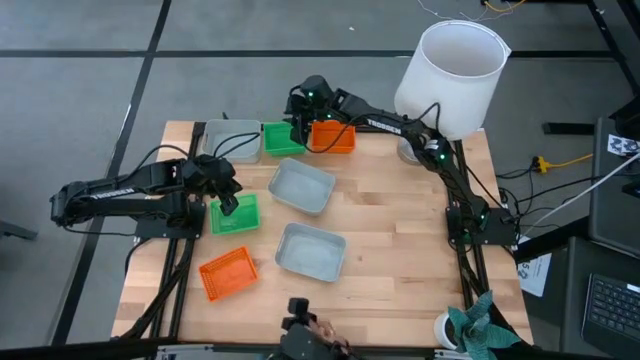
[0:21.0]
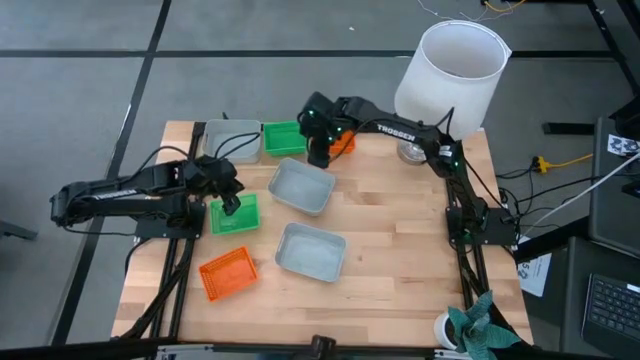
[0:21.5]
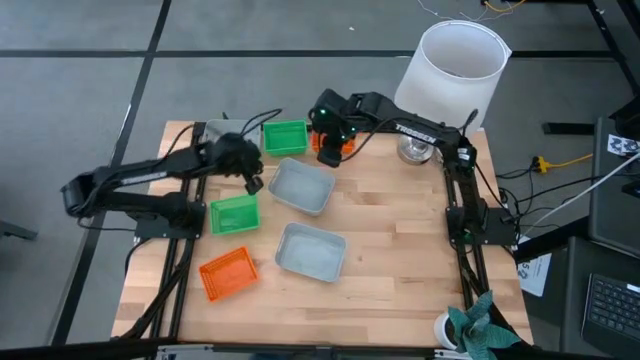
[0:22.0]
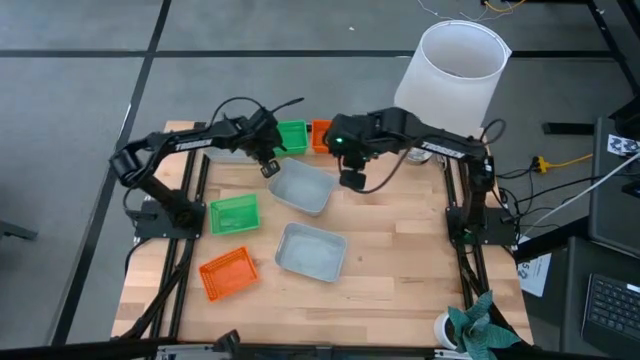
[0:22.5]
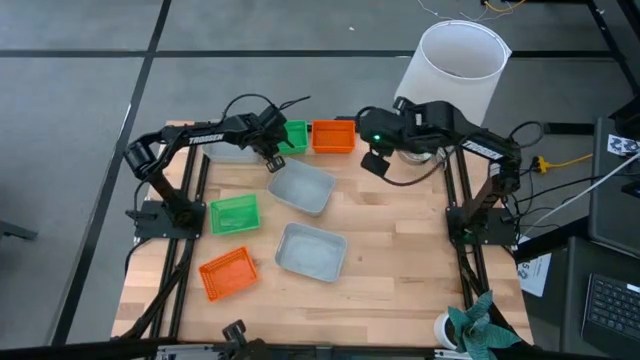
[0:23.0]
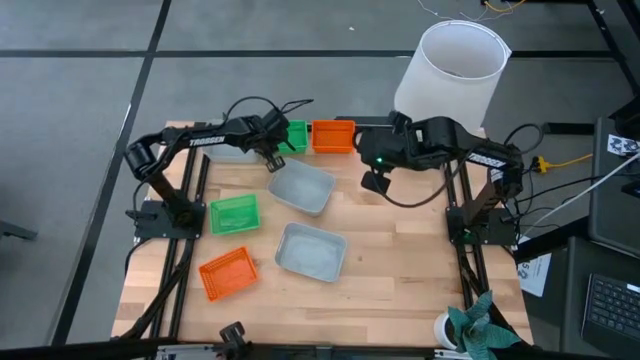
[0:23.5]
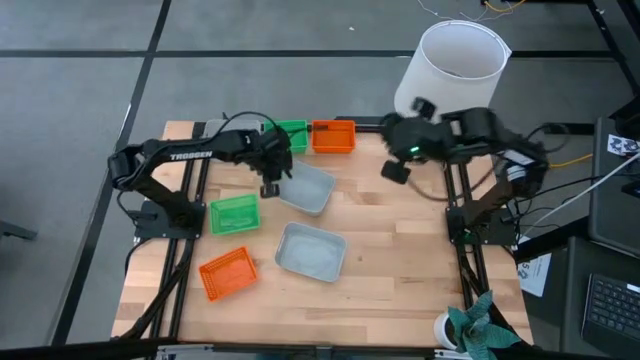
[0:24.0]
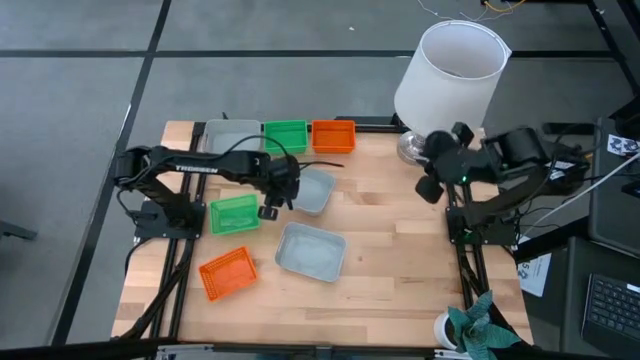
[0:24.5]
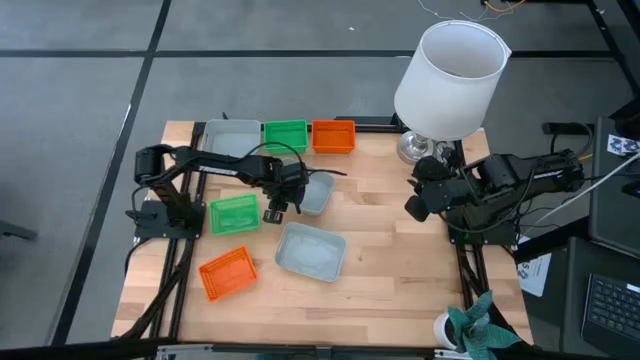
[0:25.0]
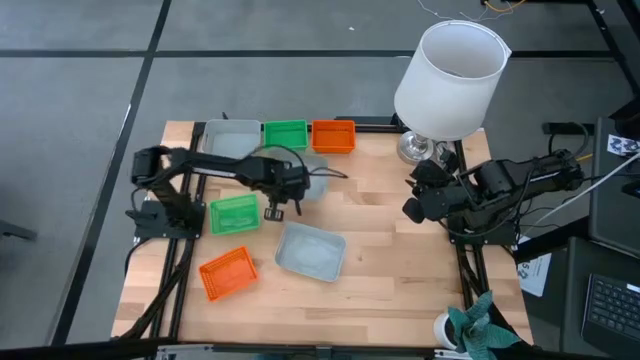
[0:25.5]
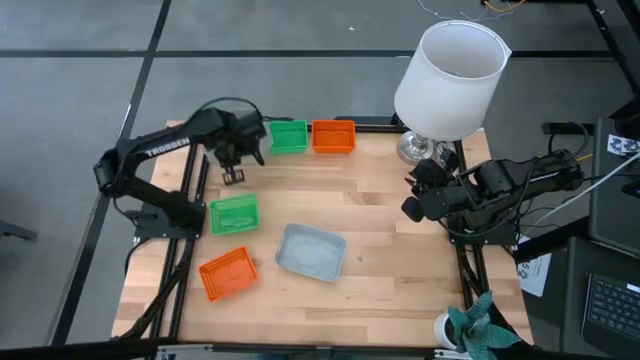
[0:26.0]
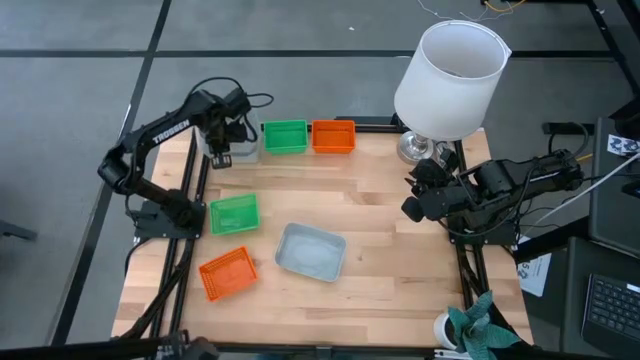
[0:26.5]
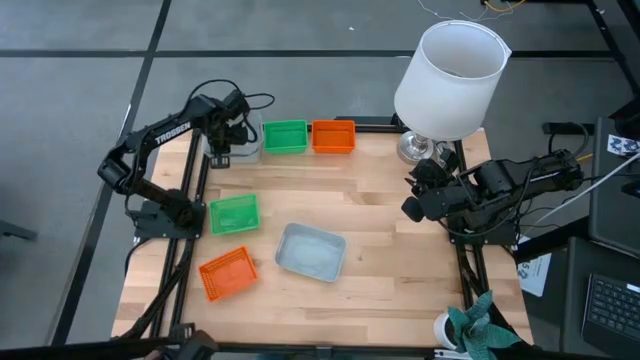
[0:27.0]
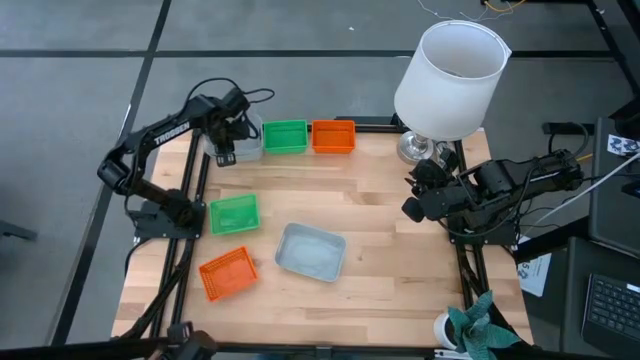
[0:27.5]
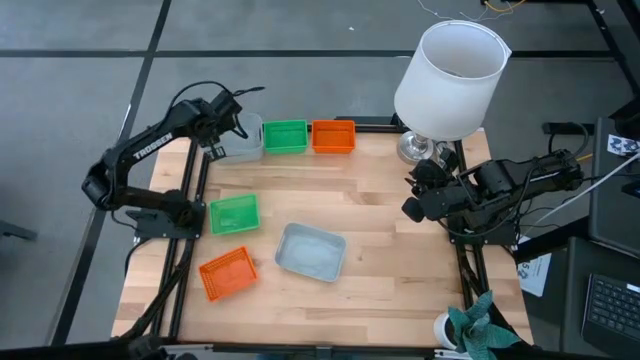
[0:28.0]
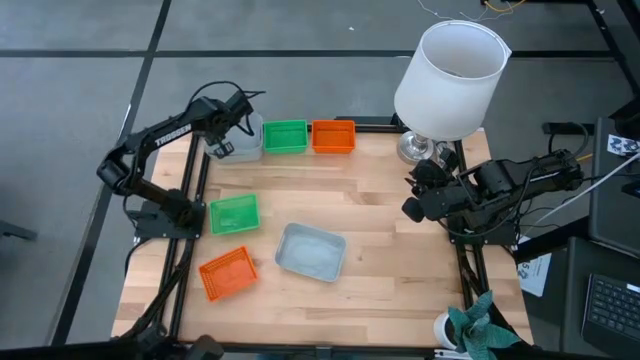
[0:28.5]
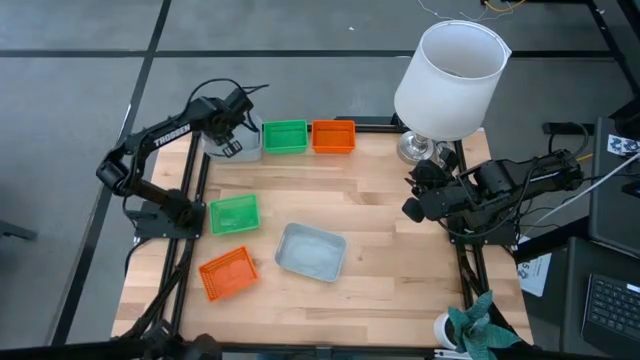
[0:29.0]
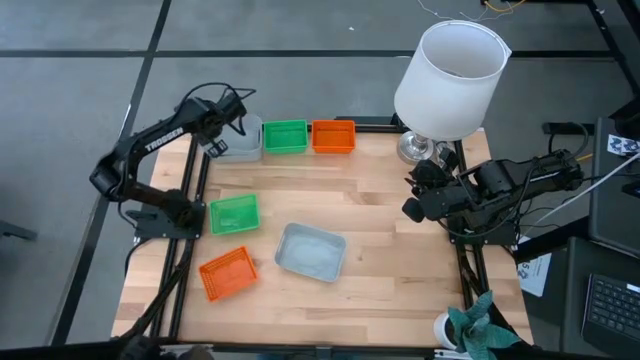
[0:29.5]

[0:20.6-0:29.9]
Stack the right gray bin into the left gray bin

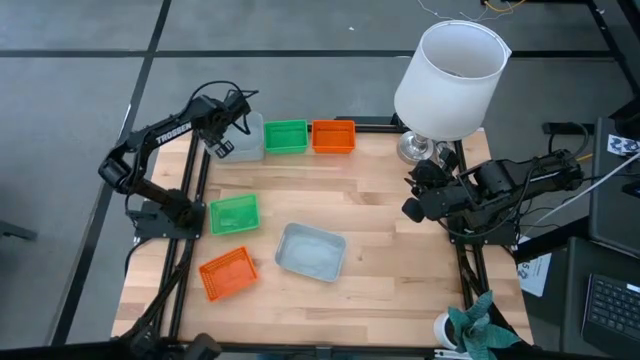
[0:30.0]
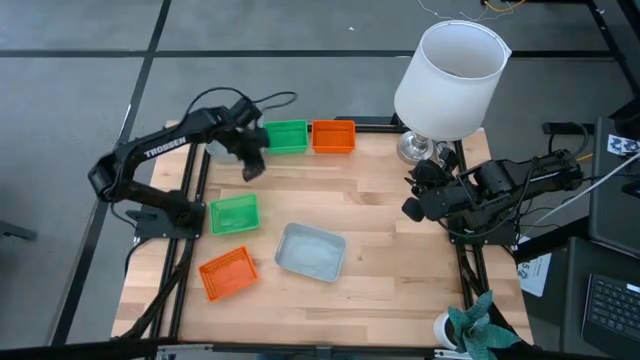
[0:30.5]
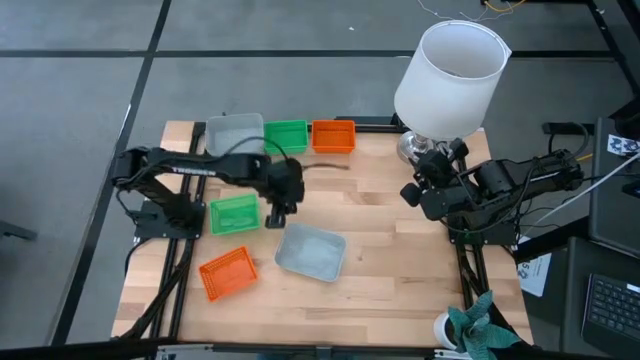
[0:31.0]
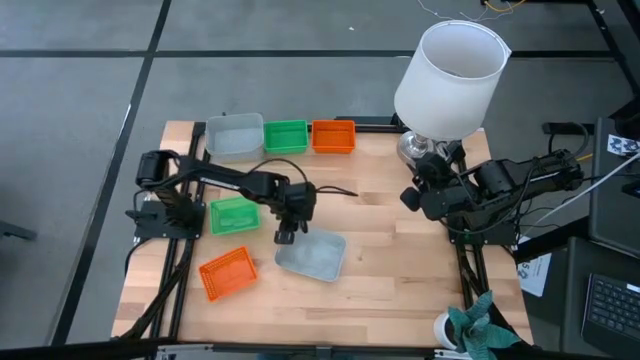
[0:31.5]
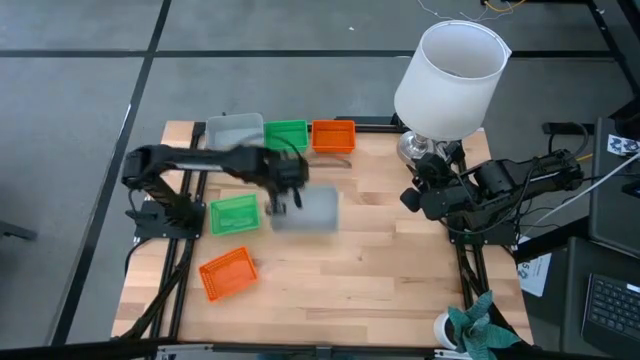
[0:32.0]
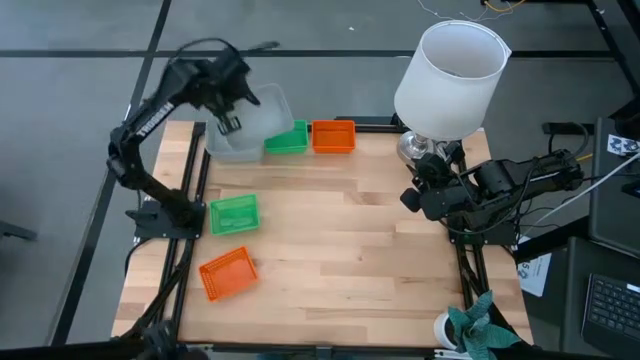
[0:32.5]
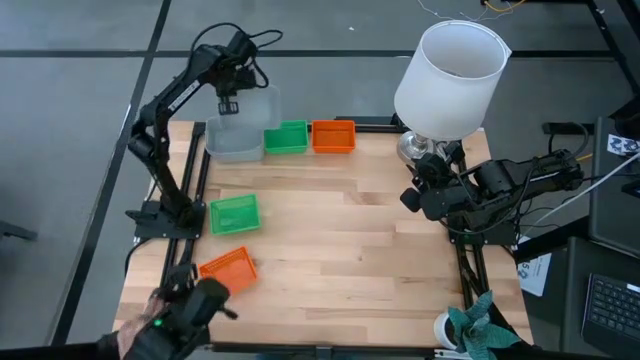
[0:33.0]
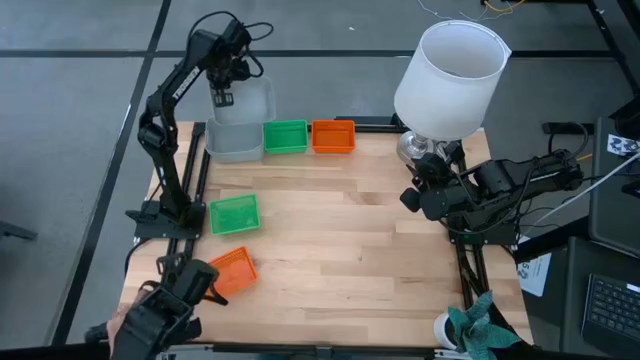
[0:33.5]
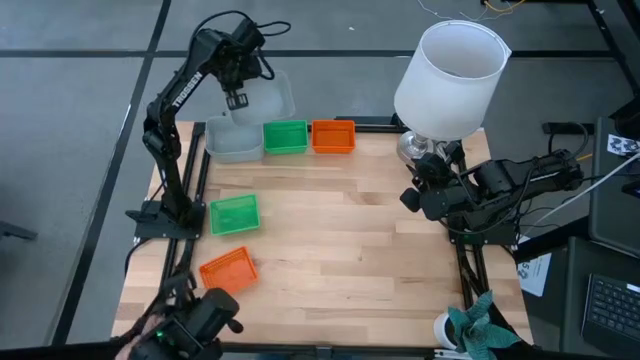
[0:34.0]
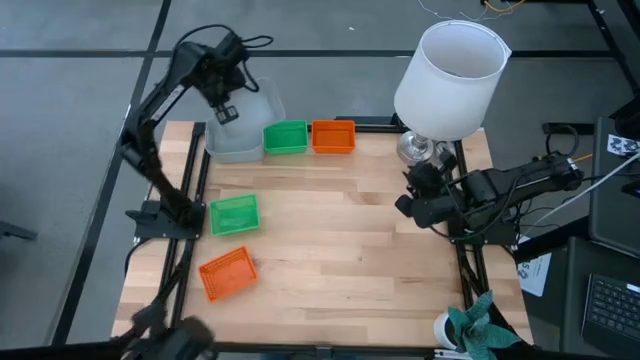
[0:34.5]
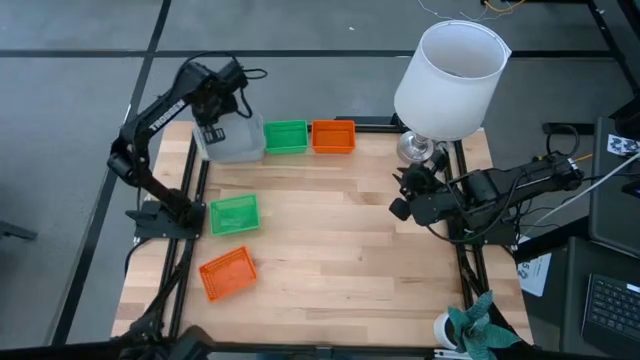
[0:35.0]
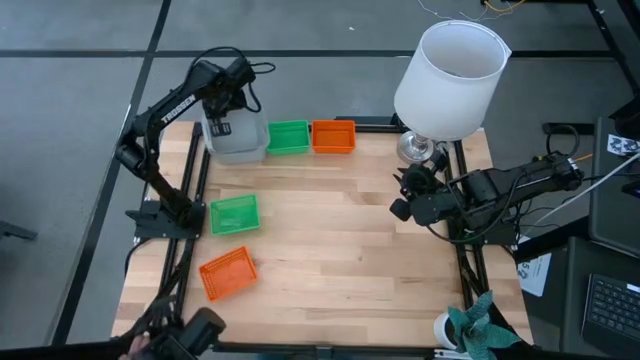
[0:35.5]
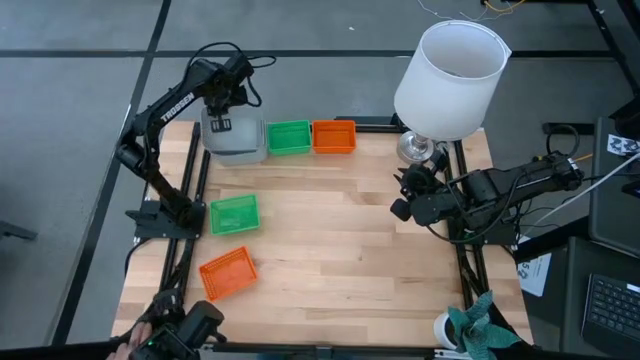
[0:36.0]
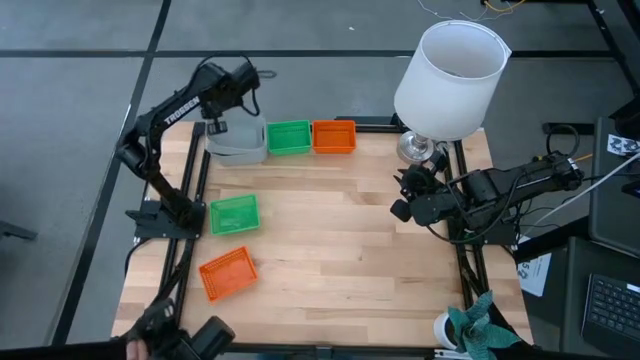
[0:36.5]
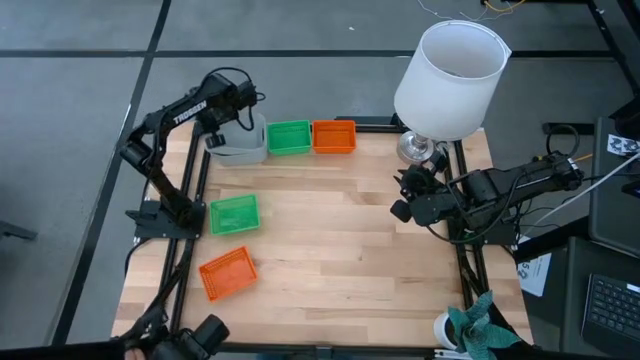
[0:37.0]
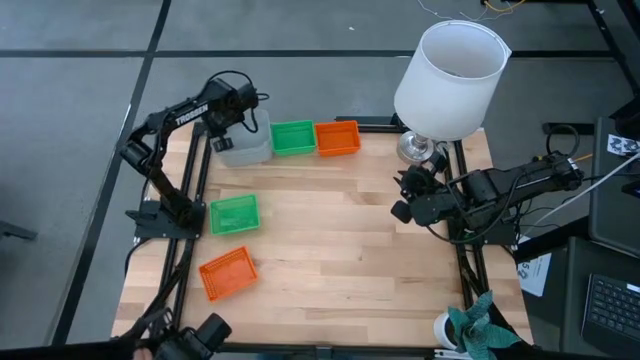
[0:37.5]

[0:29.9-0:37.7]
Stack the bottom gray bin into the left gray bin

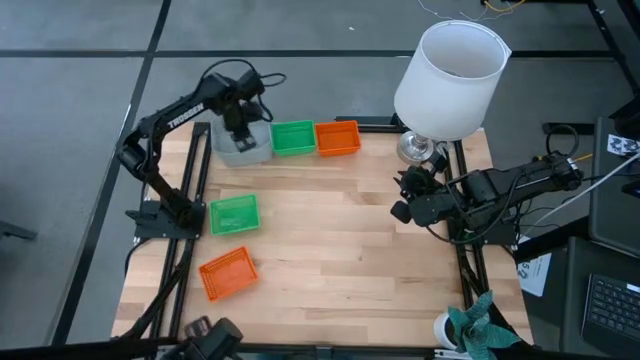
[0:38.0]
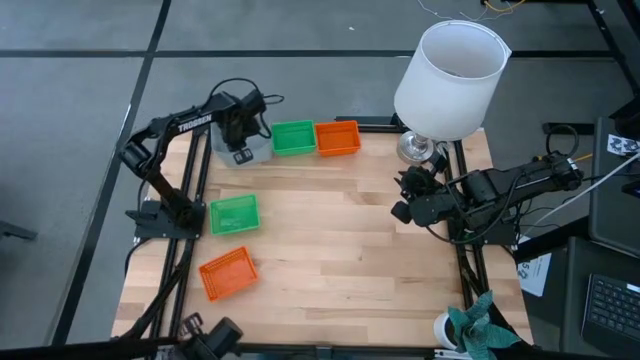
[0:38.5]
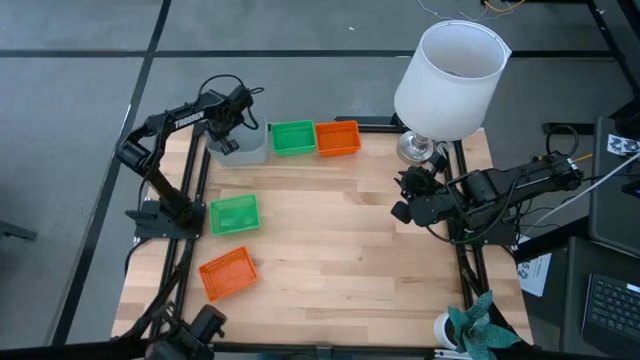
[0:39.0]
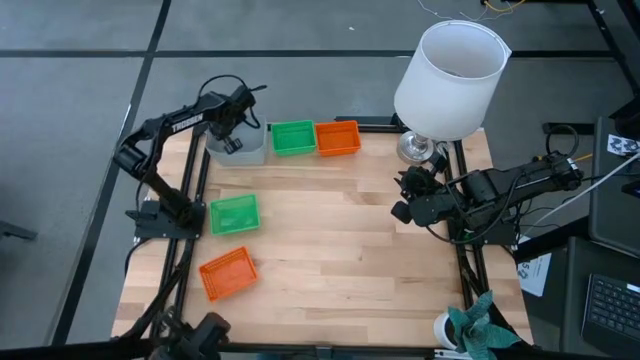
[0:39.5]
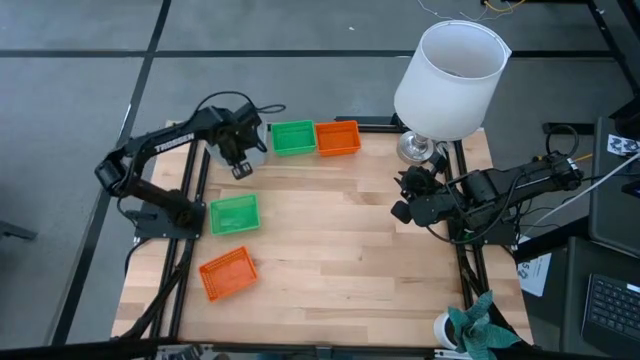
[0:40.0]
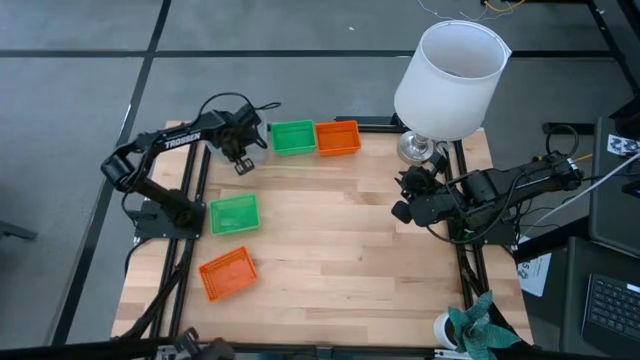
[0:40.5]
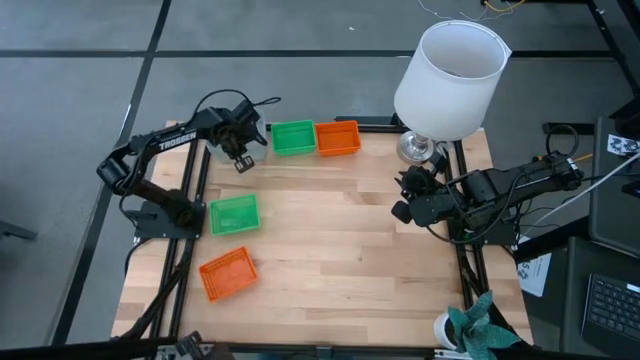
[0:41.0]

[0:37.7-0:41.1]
Adjust the gray bin

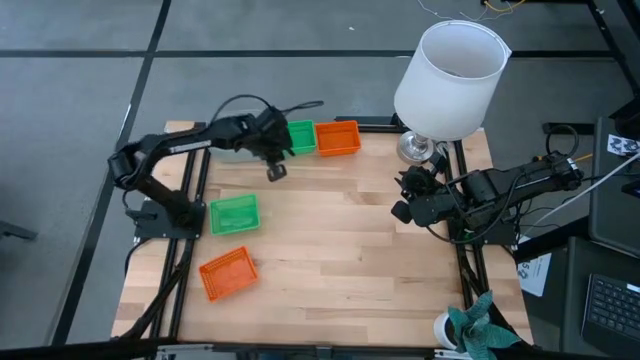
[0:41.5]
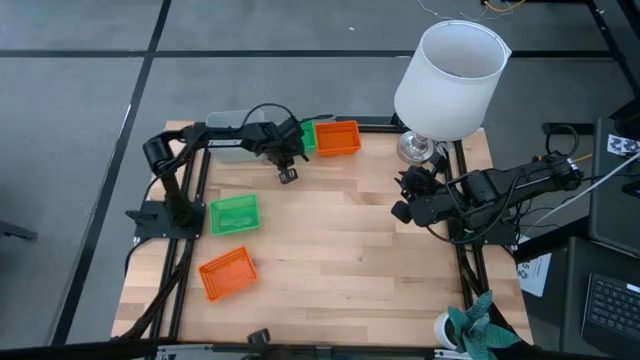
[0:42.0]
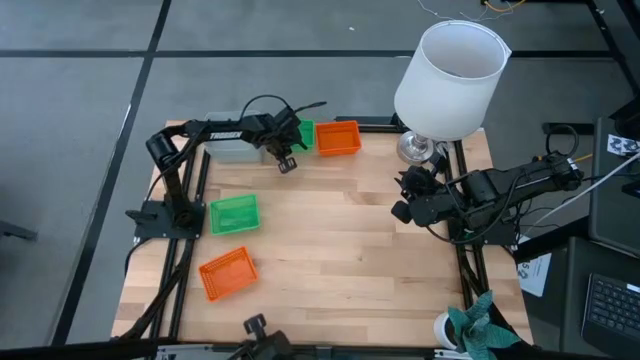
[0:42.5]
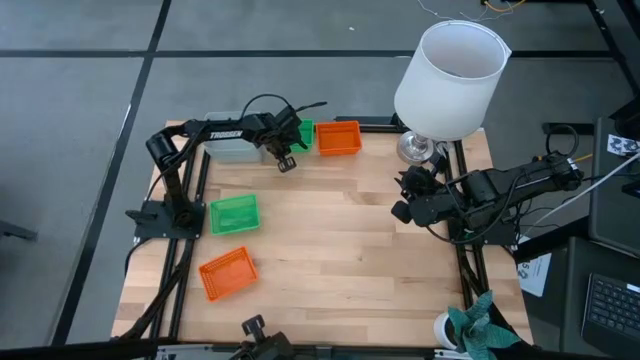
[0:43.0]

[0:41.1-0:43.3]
Adjust the green bin

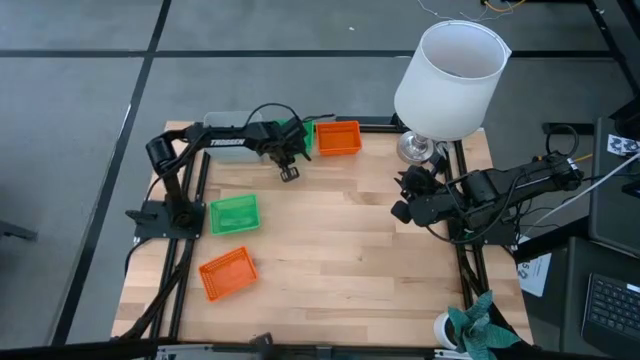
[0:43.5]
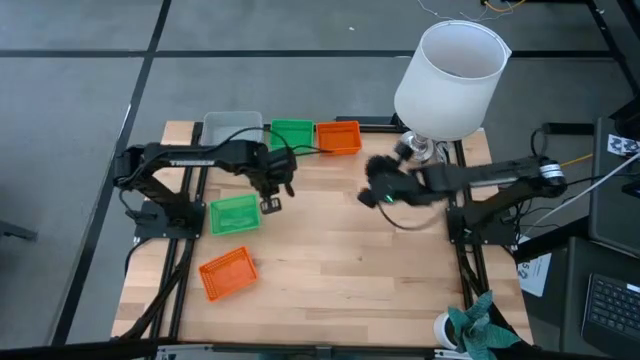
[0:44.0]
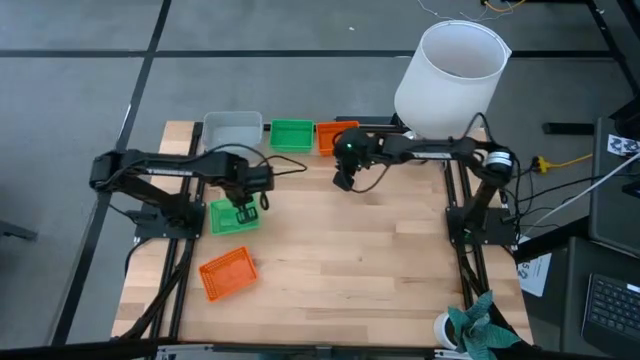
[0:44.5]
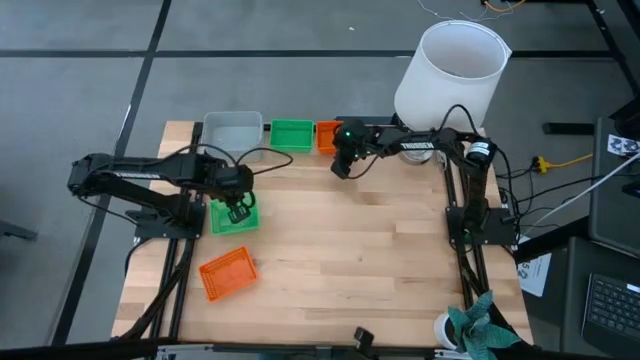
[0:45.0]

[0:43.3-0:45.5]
Adjust the orange bin
